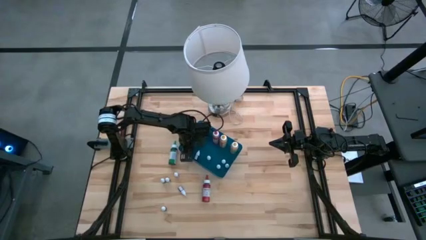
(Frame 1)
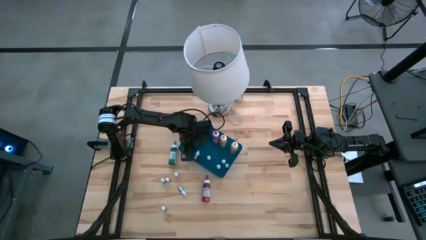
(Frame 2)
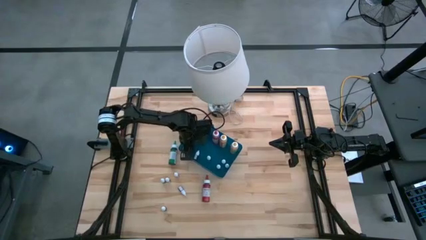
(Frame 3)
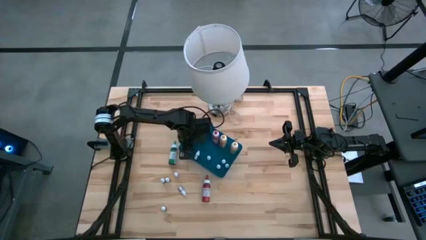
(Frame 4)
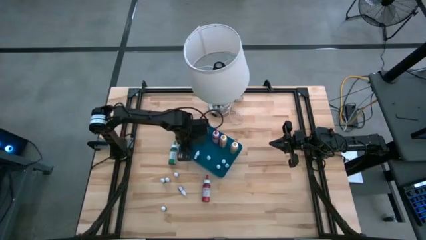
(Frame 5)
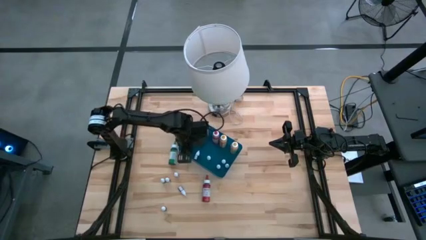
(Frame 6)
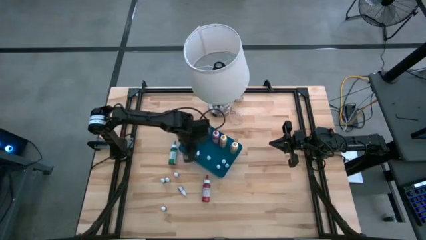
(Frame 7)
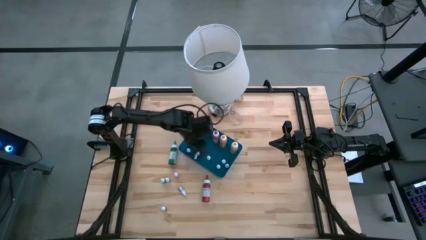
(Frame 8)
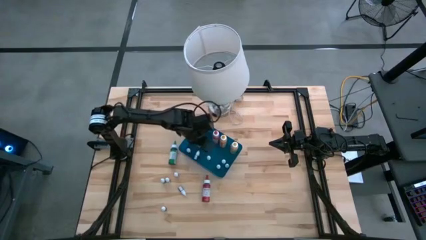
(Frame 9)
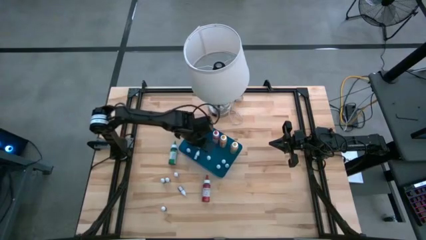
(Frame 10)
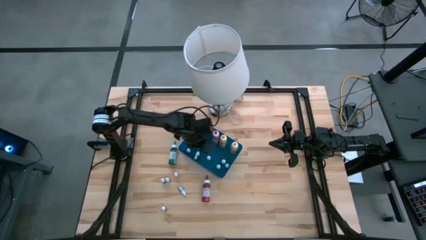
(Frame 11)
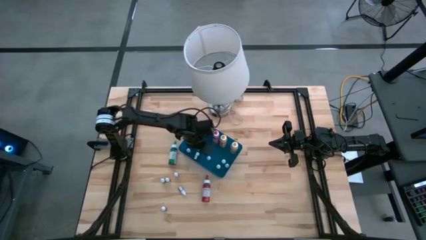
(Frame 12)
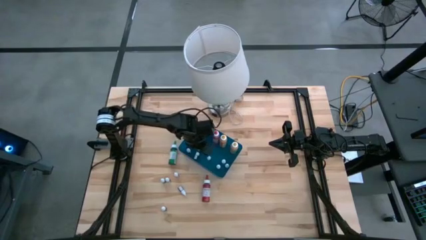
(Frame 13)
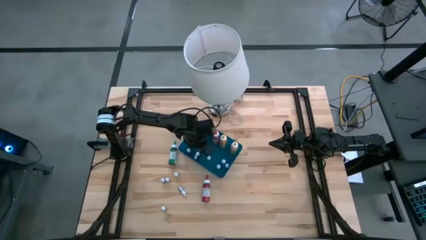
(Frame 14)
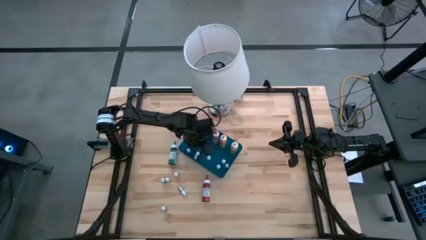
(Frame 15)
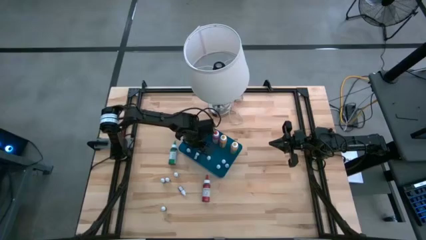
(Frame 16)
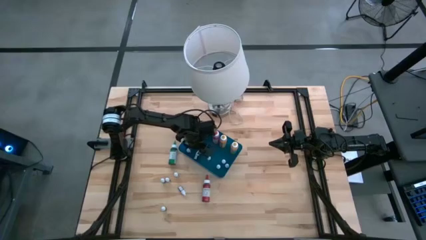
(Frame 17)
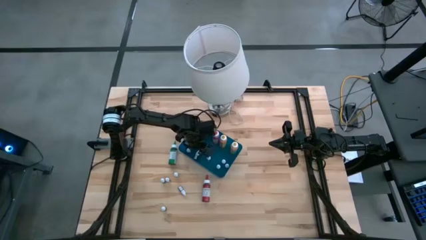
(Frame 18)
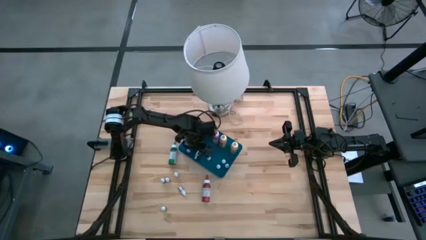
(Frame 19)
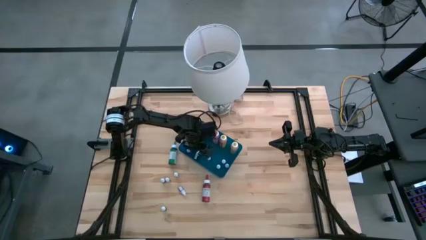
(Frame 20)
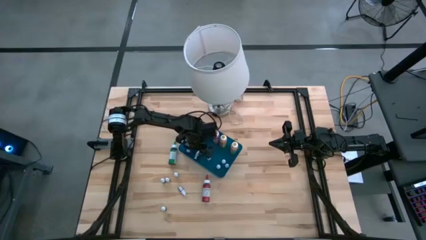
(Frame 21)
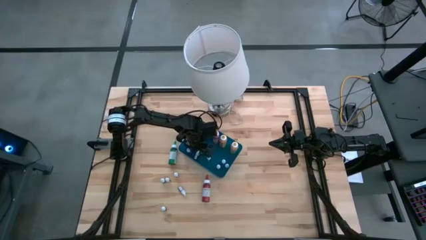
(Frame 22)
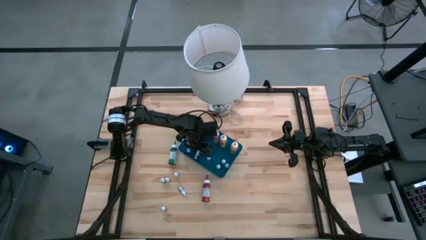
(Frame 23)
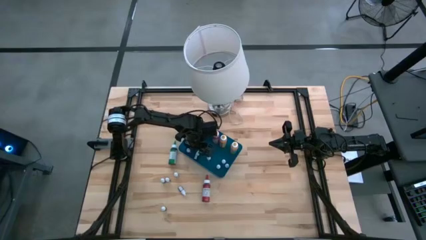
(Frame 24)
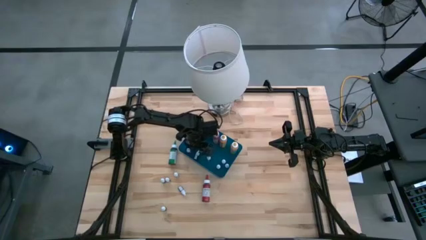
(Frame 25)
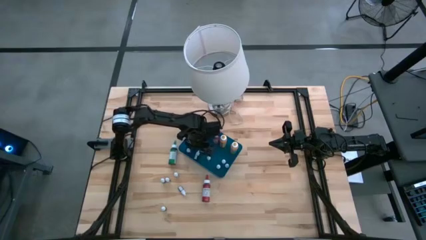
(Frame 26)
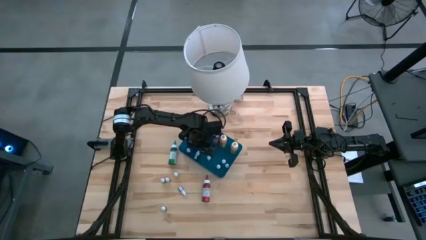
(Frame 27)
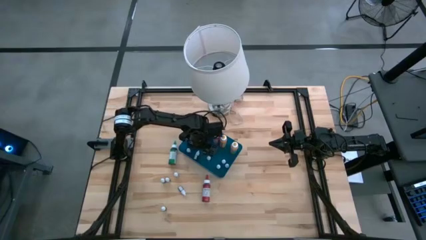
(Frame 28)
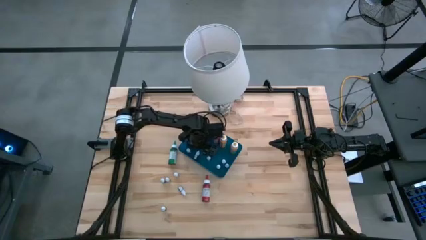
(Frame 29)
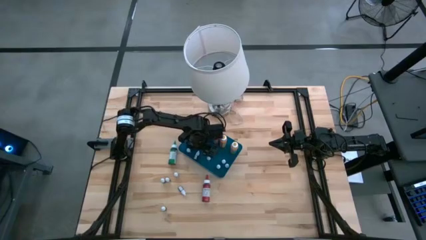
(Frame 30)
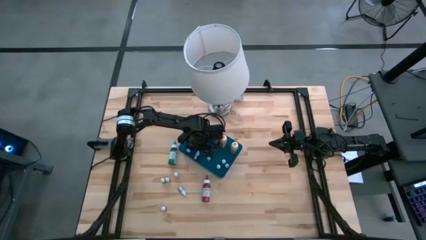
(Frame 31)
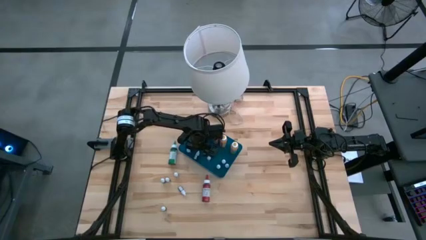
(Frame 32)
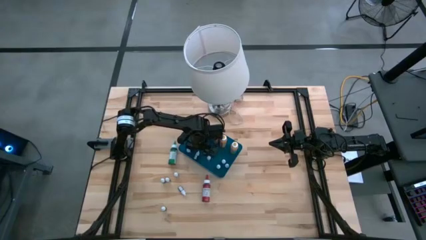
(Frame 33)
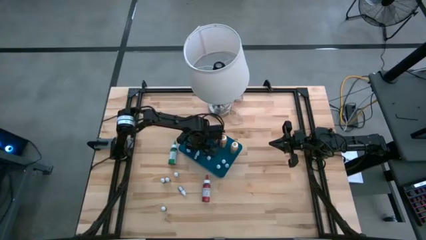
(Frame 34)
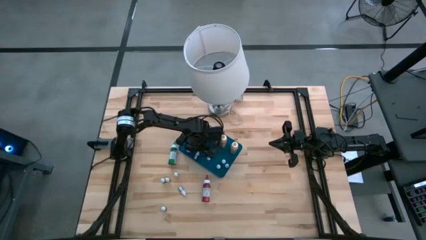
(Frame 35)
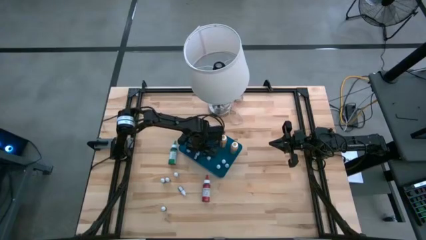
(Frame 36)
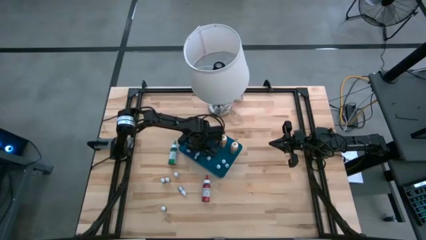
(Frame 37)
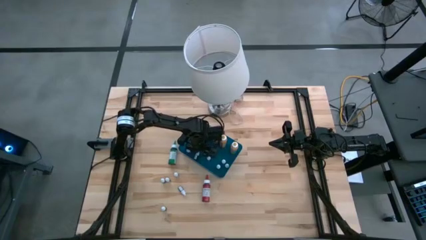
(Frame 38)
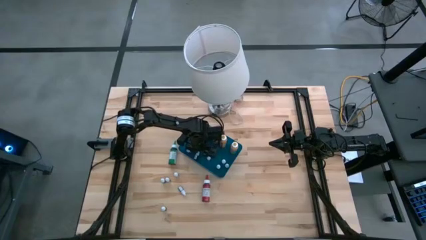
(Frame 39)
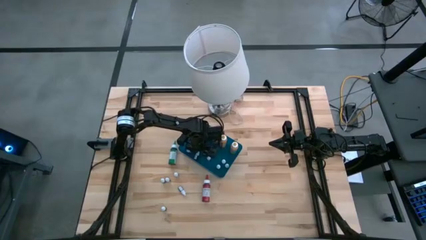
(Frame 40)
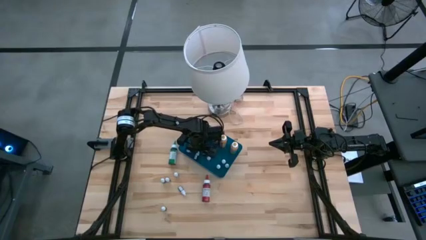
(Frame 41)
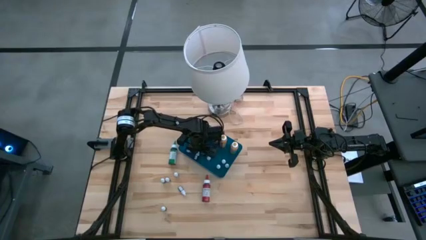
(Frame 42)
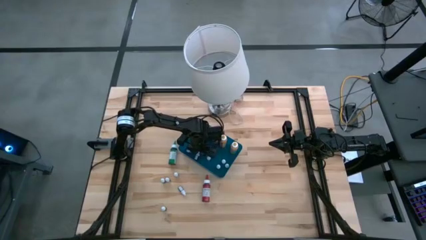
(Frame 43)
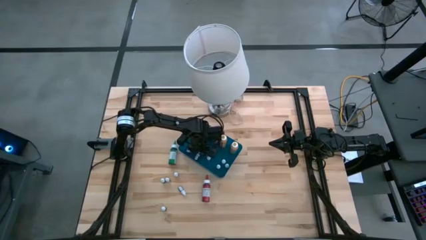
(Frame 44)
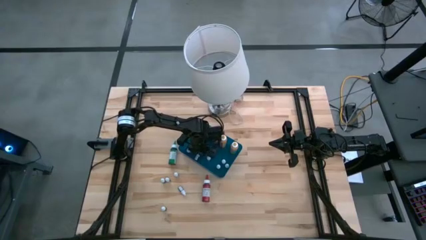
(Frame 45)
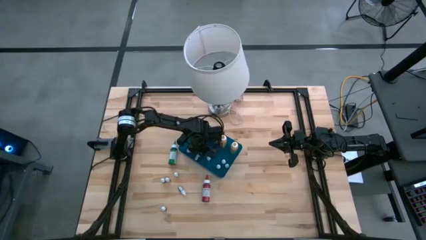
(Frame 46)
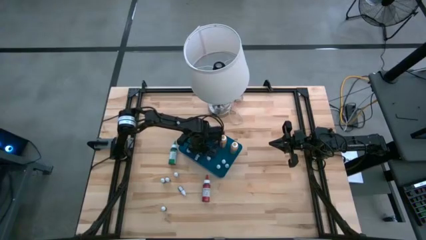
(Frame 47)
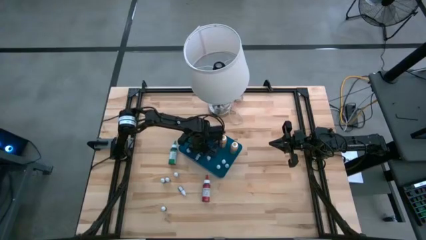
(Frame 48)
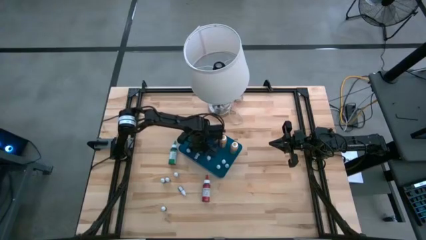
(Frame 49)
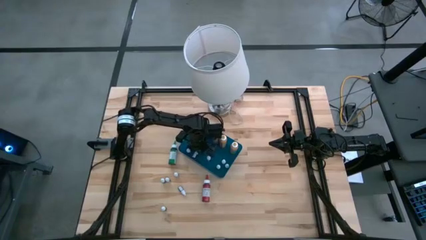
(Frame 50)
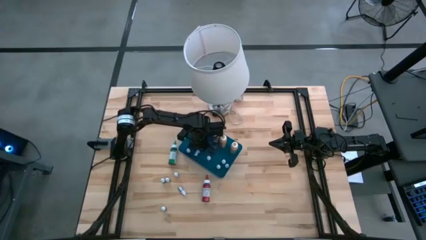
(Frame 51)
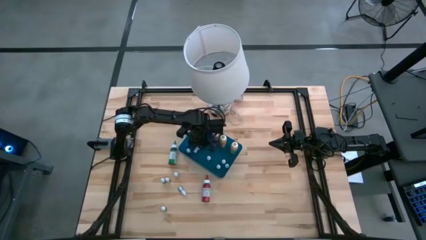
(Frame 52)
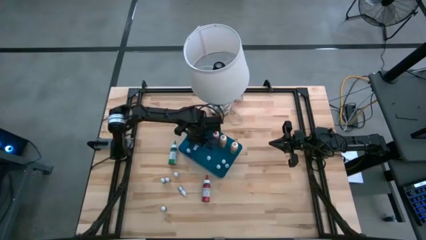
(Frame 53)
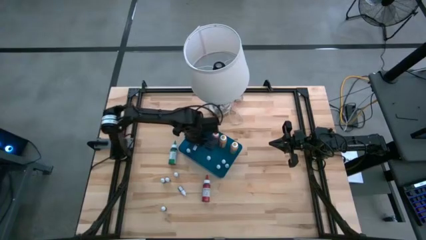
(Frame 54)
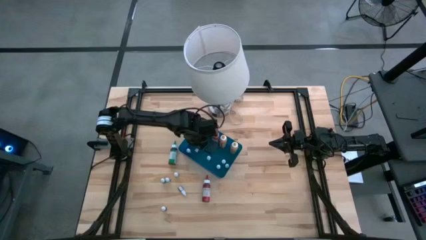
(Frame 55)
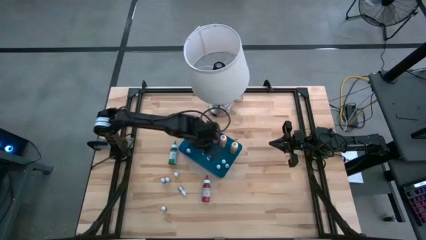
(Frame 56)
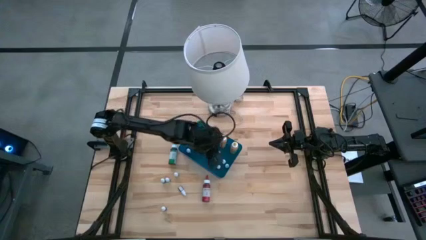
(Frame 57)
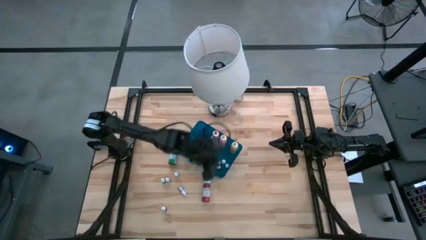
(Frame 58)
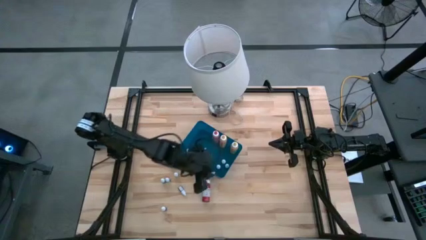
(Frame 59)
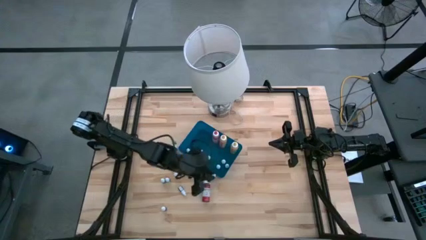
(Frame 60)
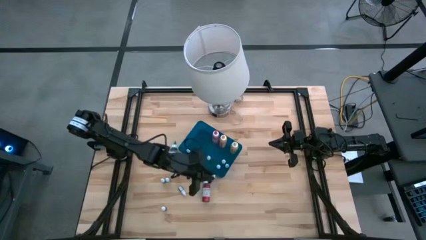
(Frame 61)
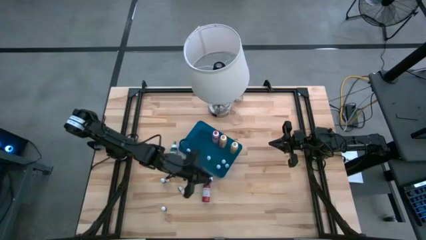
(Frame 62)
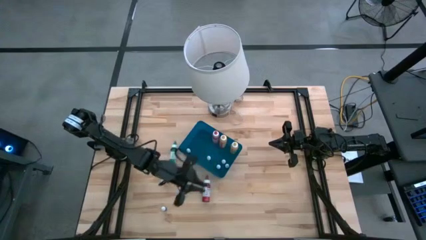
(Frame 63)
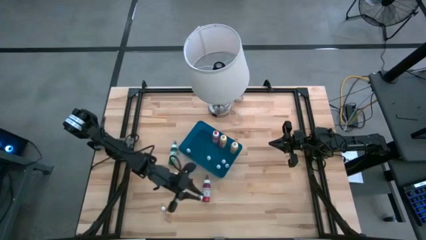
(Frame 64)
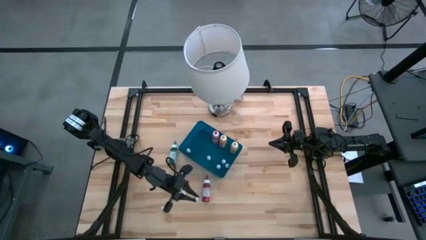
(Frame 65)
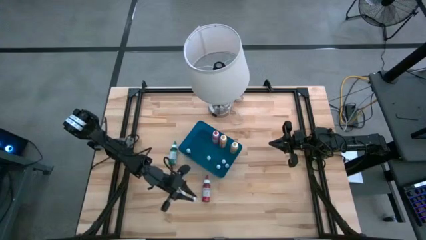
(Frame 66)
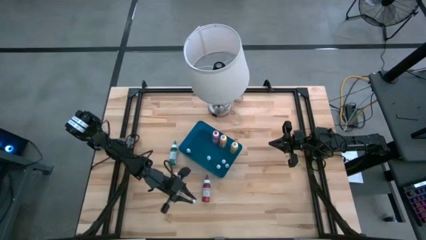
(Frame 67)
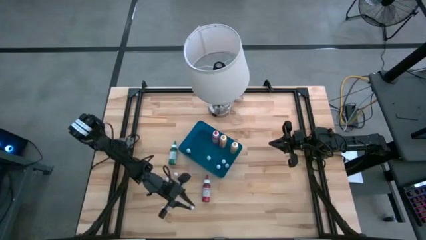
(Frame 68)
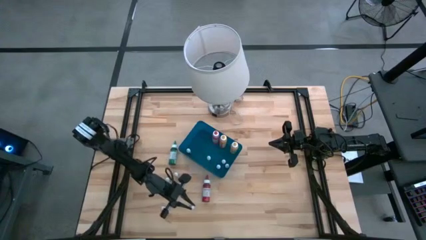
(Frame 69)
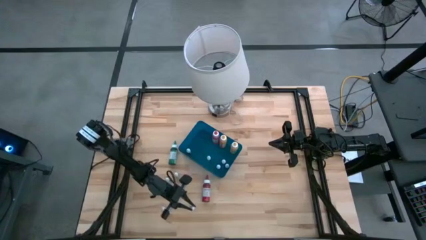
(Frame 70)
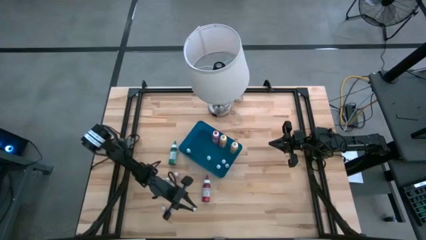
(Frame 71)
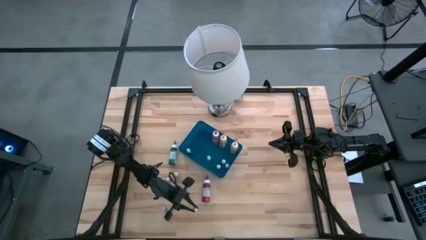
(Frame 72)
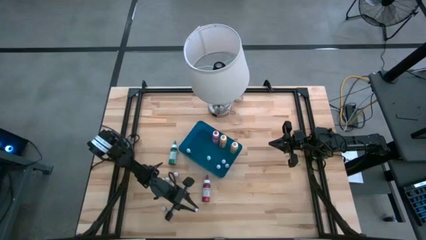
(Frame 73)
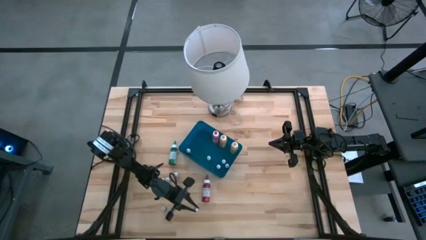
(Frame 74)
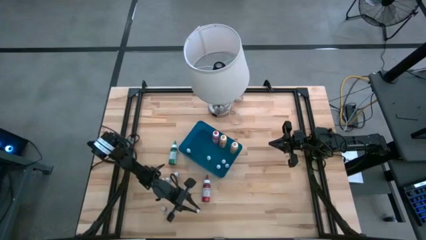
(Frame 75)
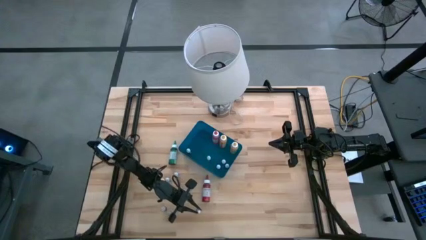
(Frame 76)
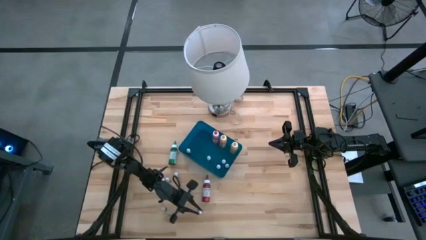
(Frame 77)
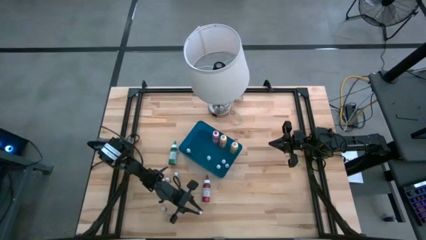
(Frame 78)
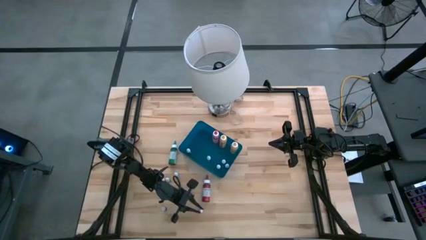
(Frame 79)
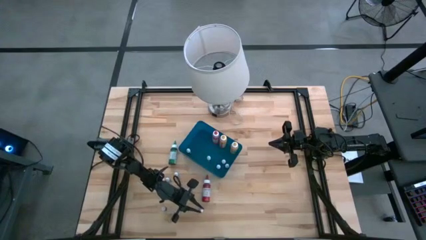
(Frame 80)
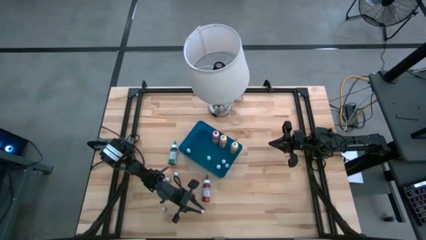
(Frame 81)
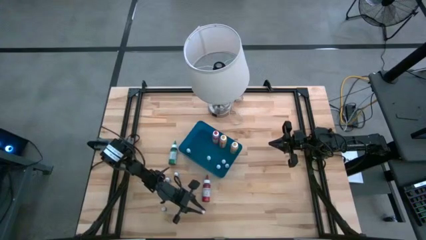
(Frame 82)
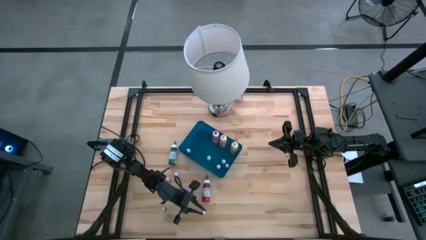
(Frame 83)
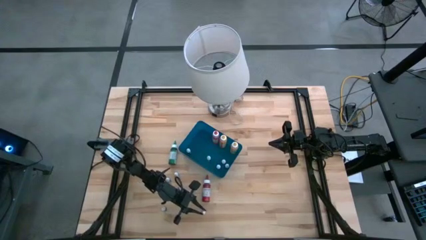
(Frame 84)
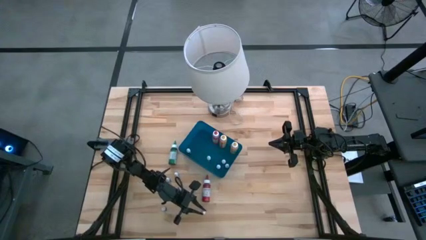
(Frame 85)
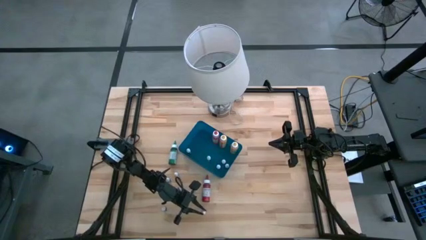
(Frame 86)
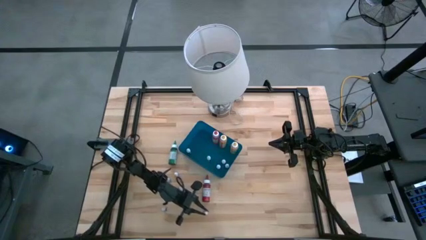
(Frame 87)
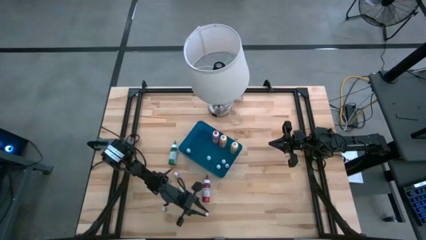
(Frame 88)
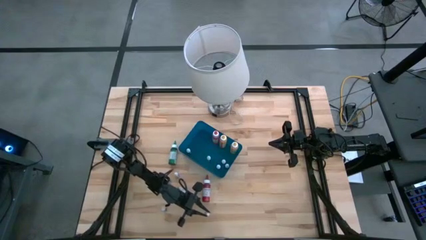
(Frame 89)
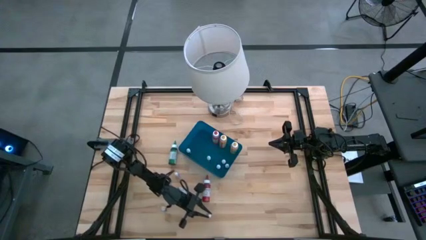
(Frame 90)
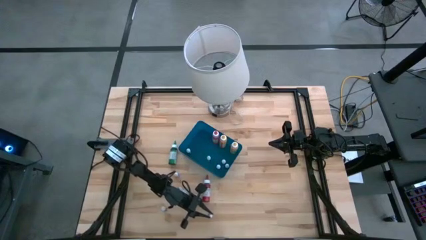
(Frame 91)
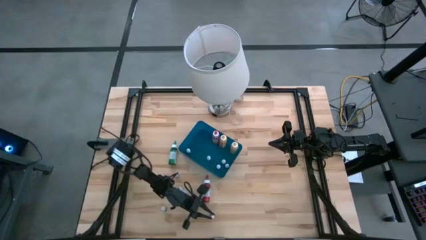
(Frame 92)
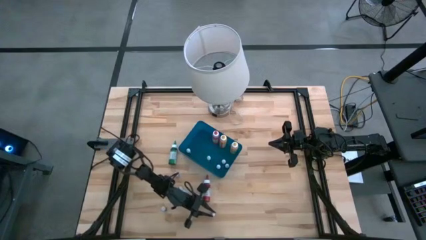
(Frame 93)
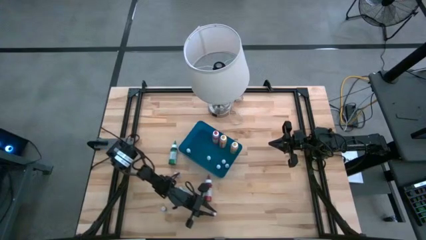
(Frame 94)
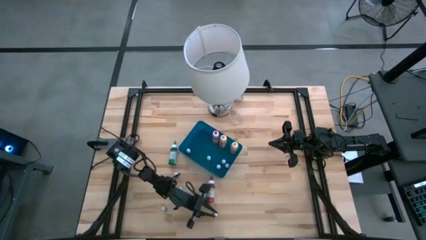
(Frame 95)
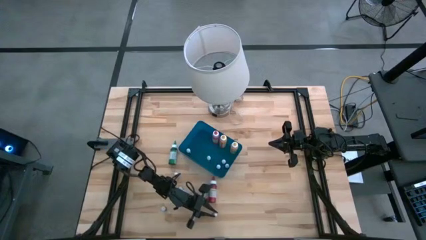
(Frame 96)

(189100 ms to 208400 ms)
Task: Pick & Place food coloring
Remove the small red food coloring bottle from the blue container
